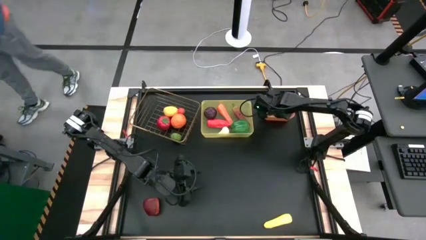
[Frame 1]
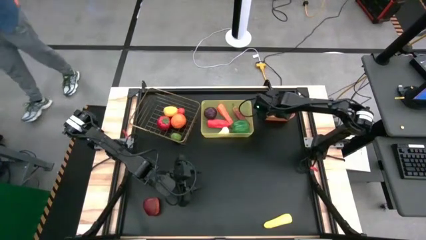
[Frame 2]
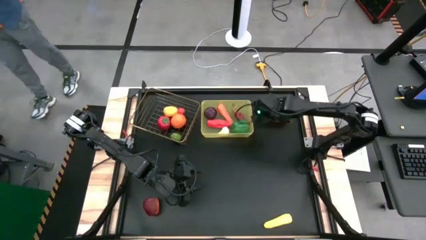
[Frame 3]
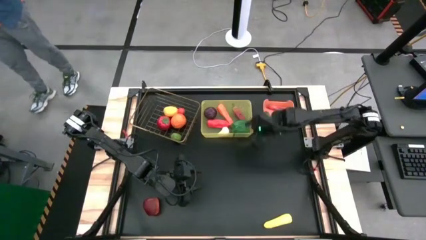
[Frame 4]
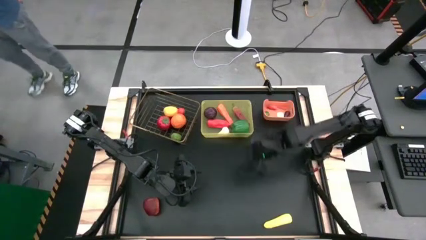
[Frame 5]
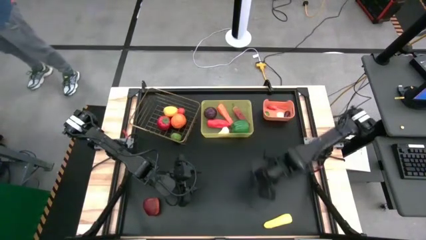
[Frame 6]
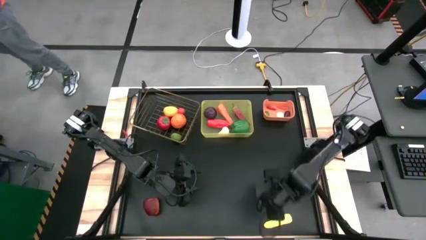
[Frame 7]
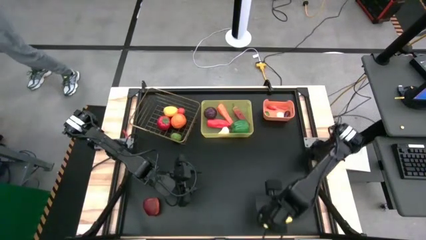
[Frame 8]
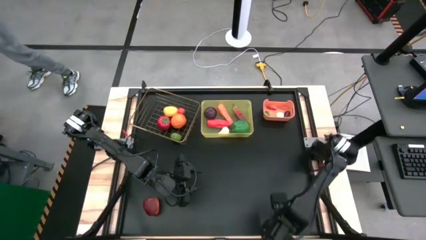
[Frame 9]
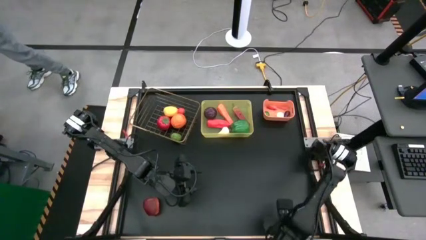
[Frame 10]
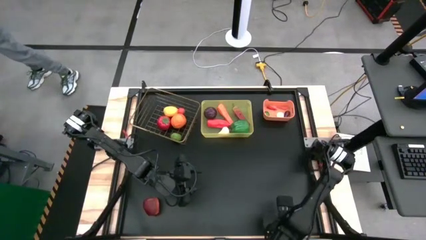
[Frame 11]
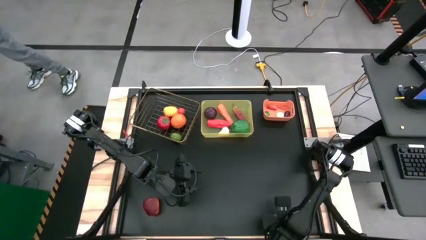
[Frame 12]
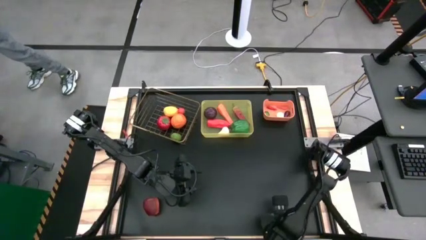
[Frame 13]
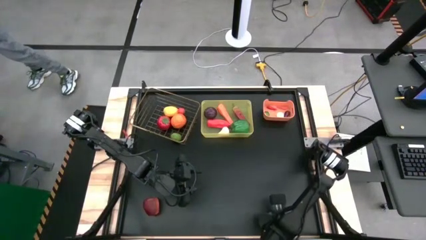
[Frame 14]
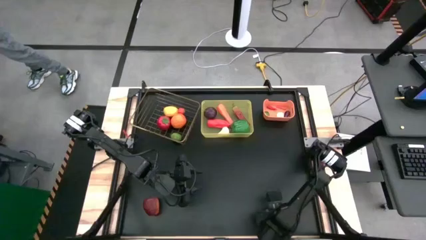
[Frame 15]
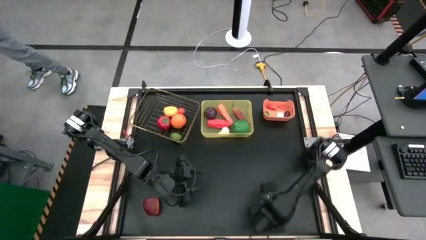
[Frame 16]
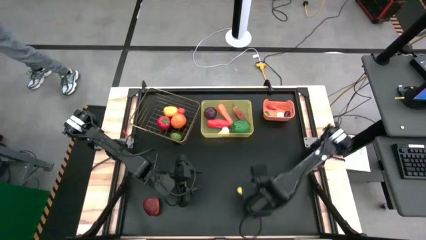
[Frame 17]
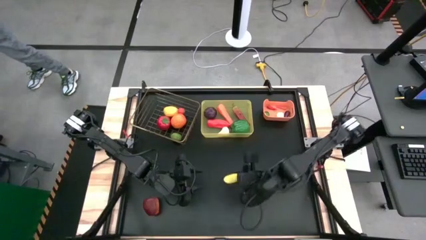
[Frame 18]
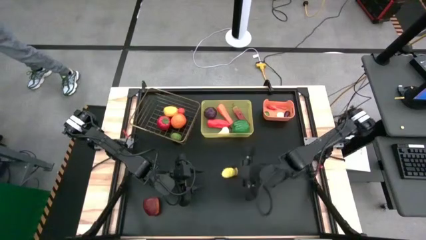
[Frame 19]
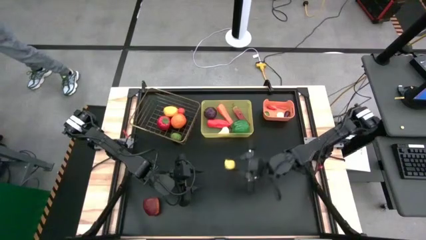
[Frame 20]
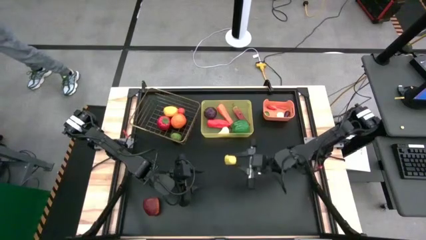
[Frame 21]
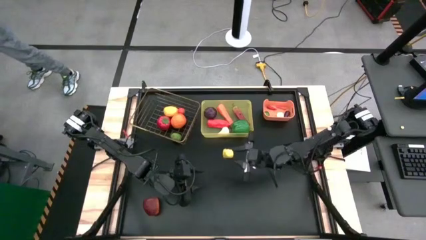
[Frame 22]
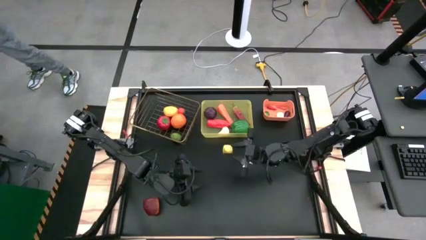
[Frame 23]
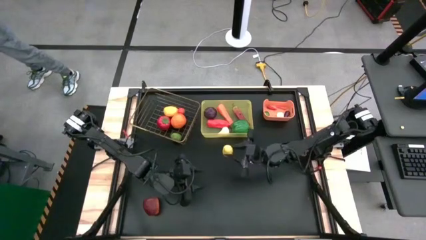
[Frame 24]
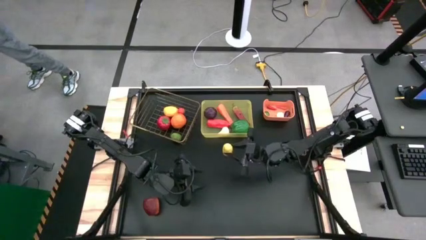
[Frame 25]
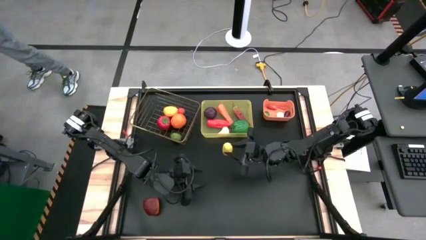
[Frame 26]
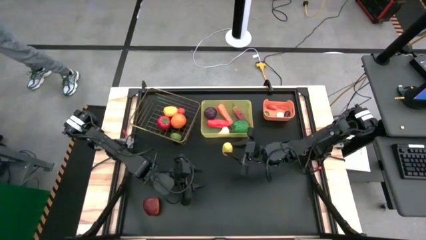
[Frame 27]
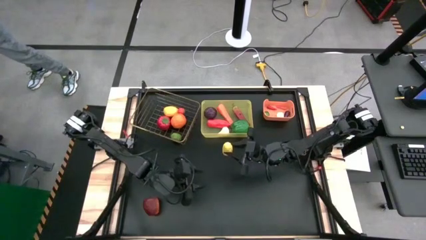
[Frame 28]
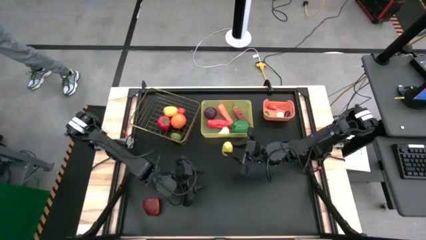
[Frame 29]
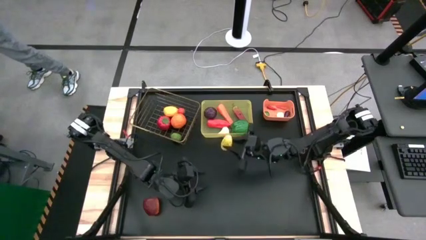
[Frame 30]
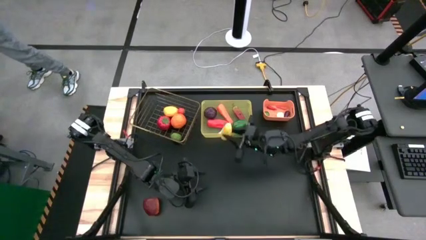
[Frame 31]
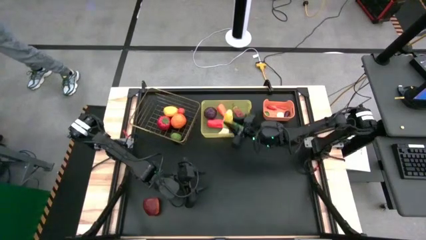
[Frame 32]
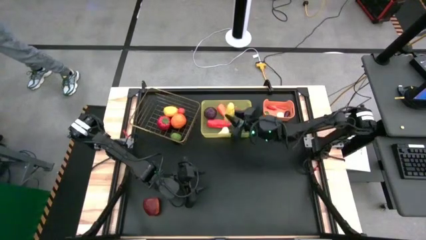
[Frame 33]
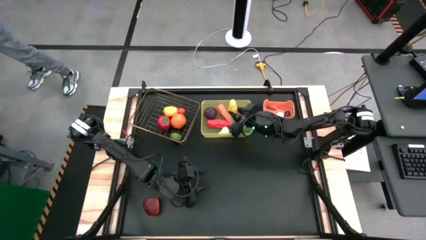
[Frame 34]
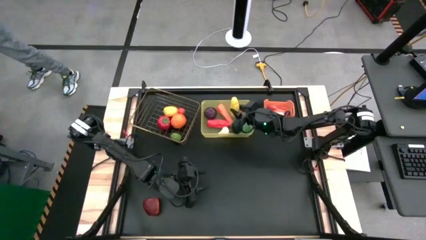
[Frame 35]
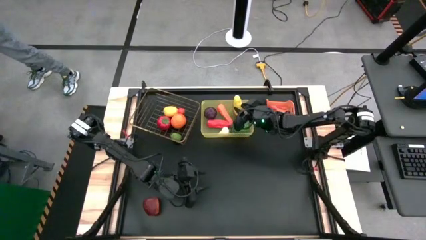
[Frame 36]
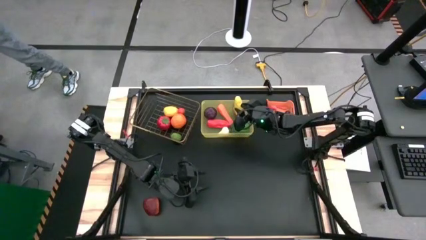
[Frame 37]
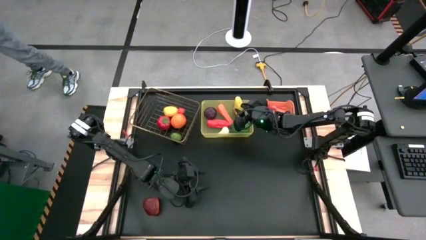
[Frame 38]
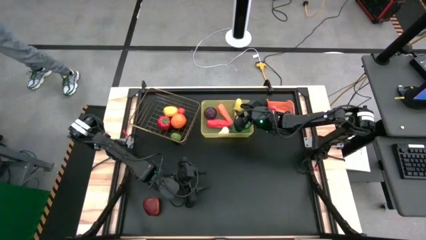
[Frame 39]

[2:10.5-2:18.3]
Task: Sort produce into baskets
Put the corn into the yellow bin

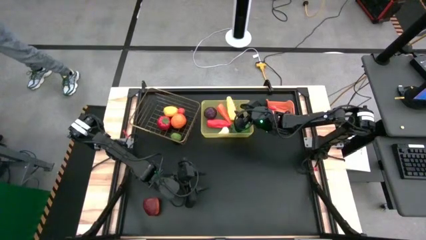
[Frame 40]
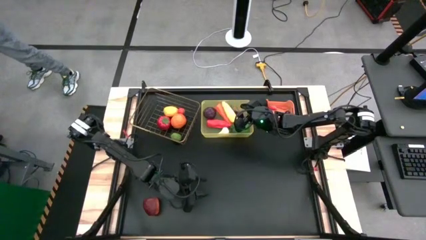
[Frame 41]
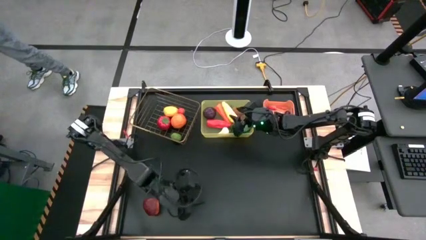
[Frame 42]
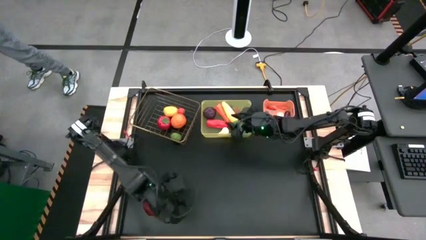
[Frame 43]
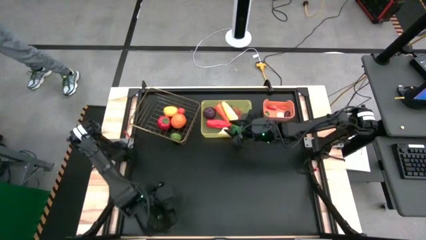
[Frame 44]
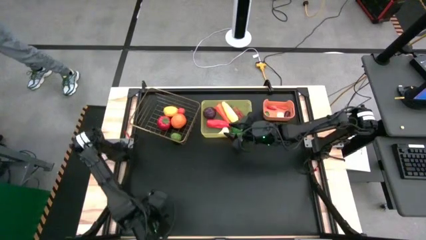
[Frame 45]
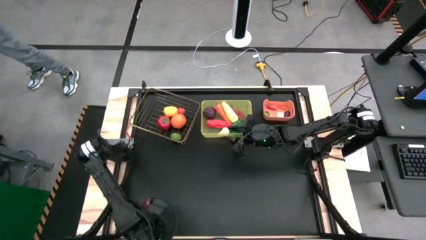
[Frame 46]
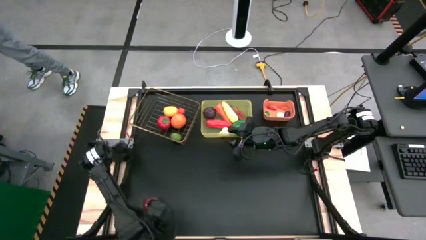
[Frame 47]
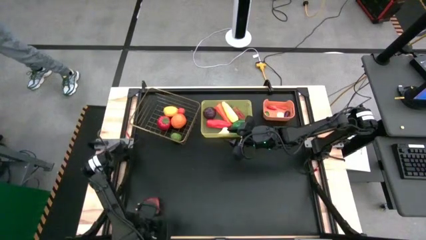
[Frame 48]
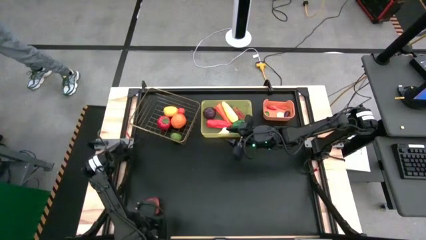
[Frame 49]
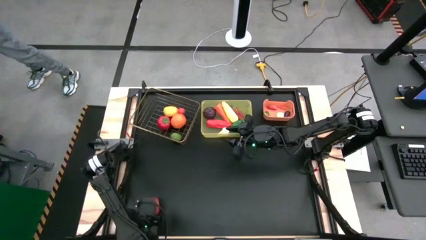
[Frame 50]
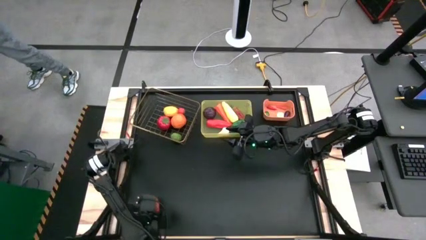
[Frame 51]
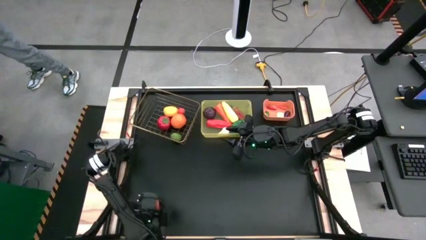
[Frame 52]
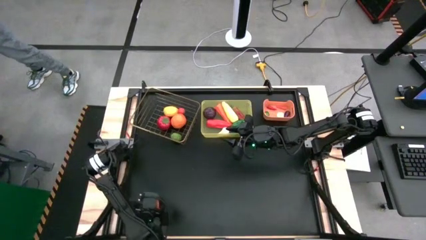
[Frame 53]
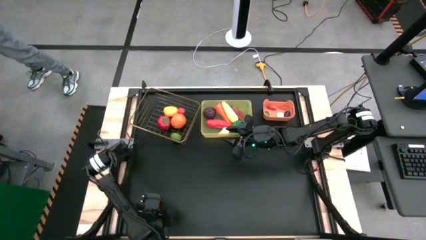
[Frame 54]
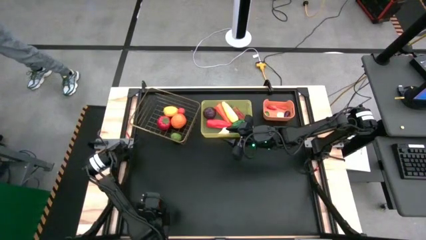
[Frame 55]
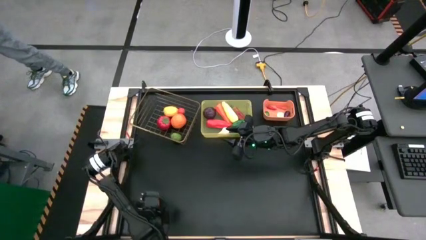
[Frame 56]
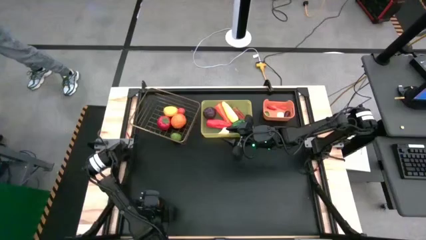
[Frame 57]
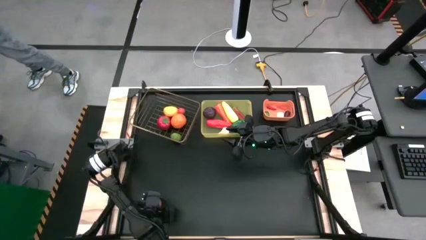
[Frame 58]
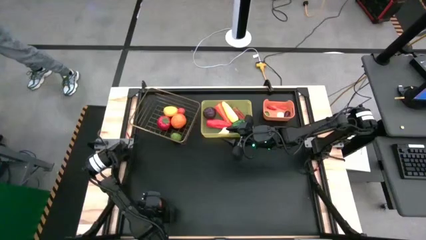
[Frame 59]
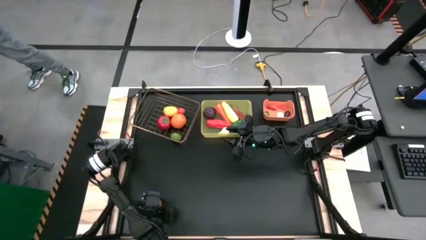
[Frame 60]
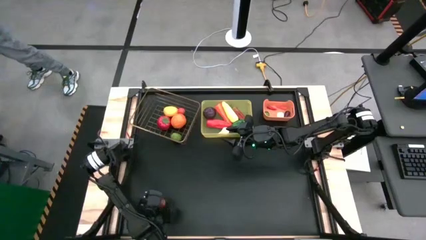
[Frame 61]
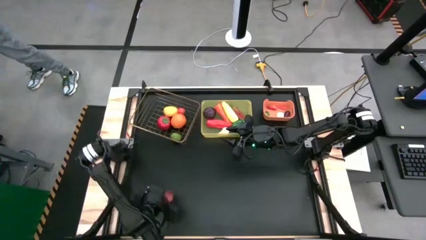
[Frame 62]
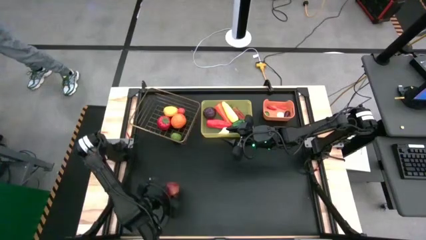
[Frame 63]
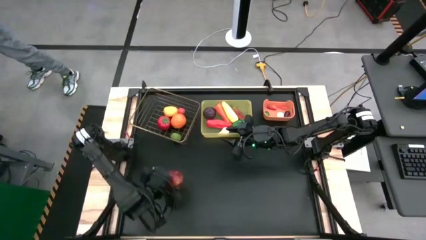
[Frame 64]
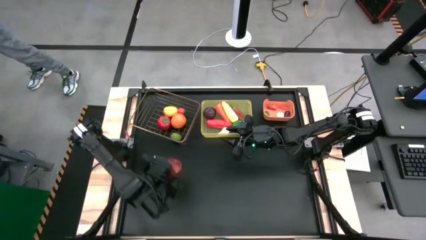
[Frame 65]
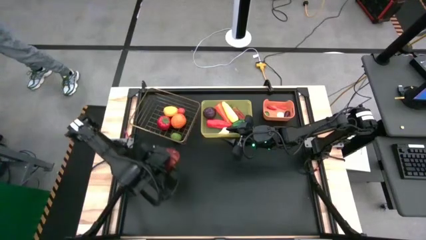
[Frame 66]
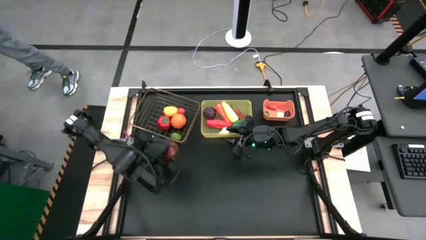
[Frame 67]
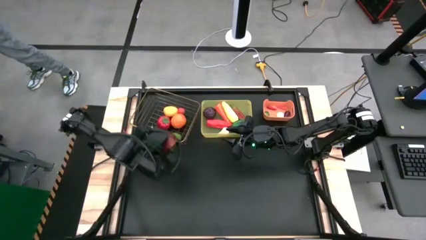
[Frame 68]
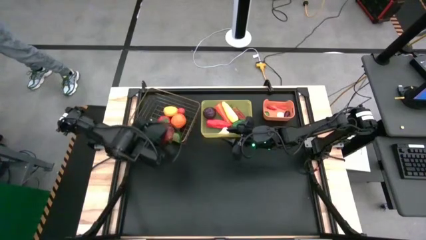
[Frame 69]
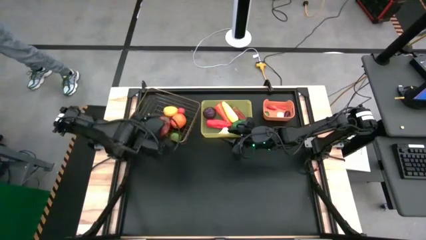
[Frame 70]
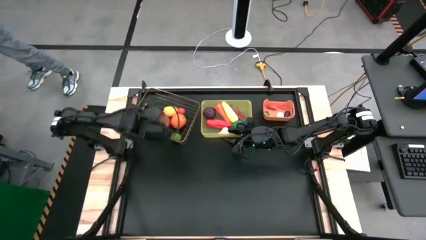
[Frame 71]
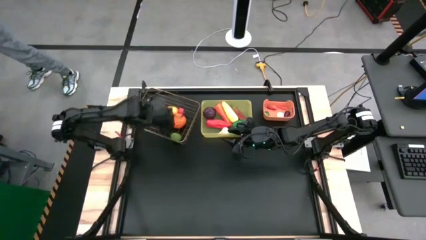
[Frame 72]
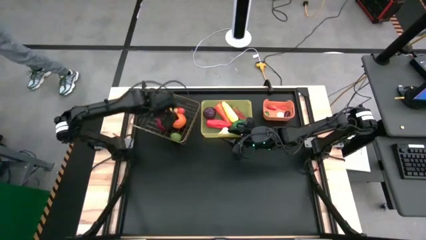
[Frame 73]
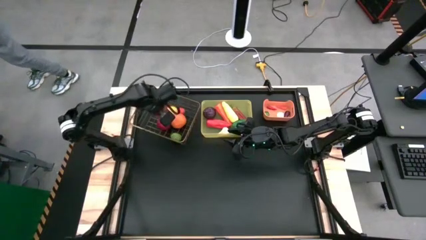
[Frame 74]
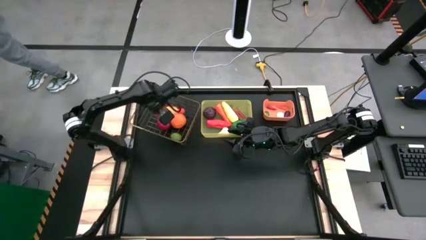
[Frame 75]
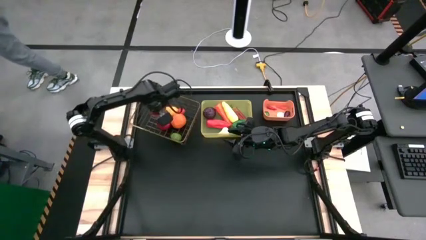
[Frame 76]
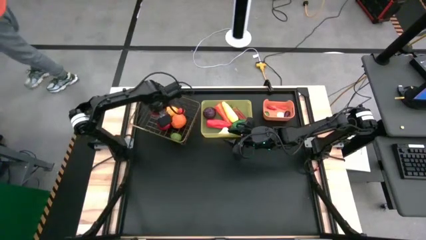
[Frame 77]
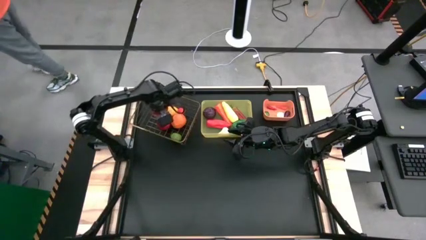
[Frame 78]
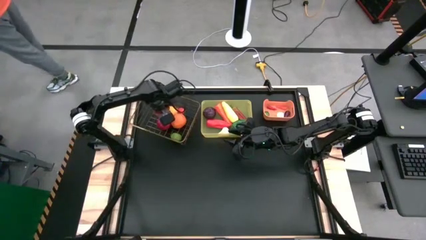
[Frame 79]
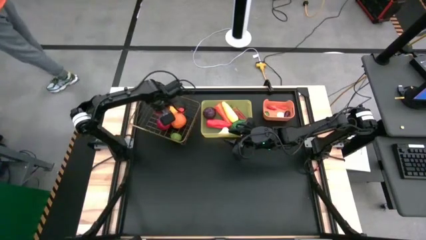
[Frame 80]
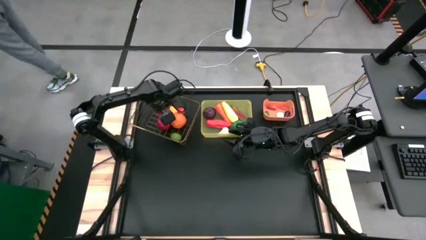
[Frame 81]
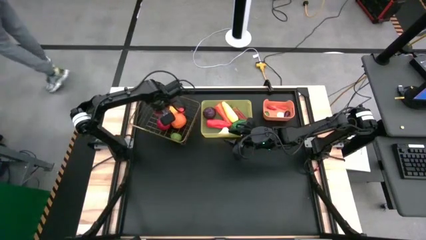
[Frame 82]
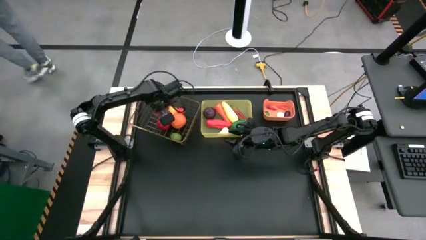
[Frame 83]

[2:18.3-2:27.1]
Put the apple into the wire bin
